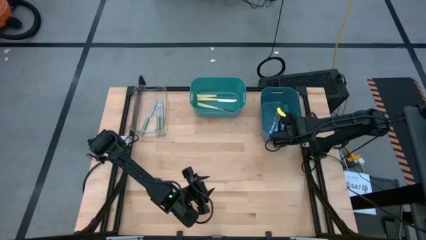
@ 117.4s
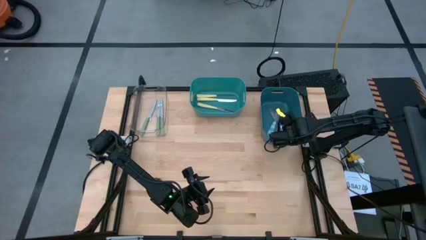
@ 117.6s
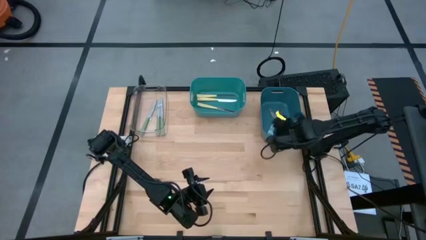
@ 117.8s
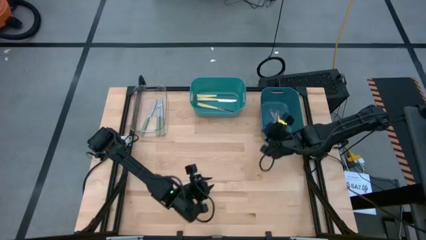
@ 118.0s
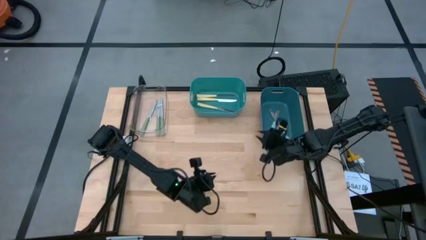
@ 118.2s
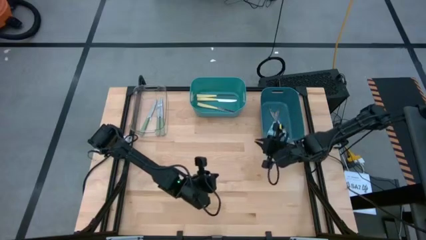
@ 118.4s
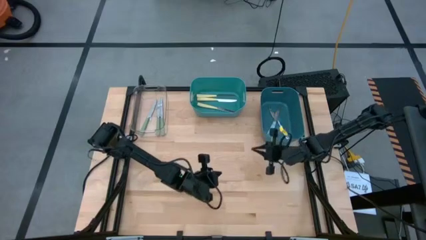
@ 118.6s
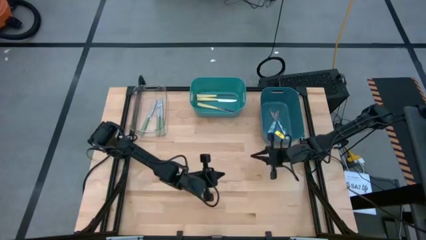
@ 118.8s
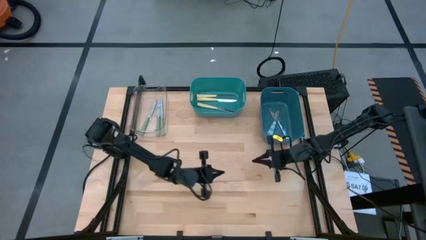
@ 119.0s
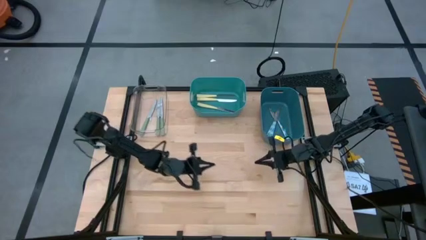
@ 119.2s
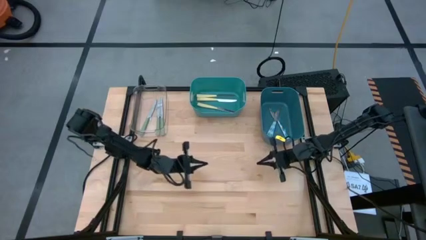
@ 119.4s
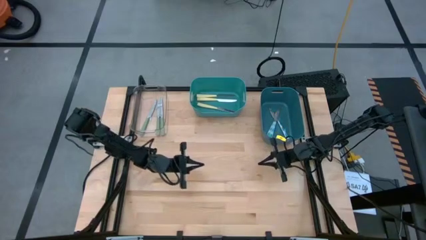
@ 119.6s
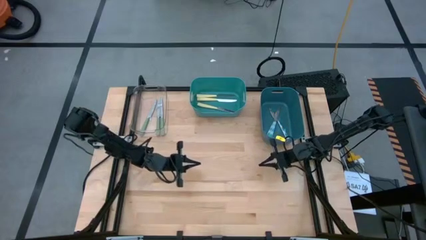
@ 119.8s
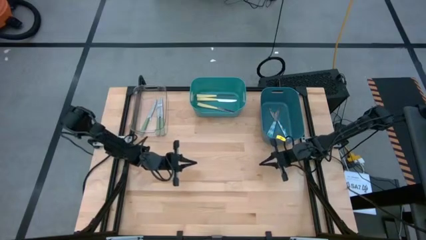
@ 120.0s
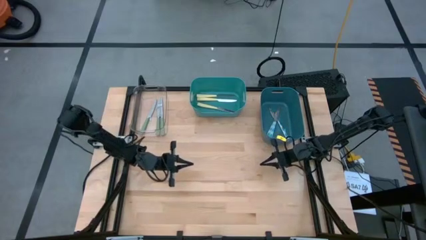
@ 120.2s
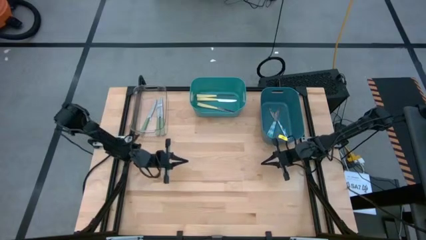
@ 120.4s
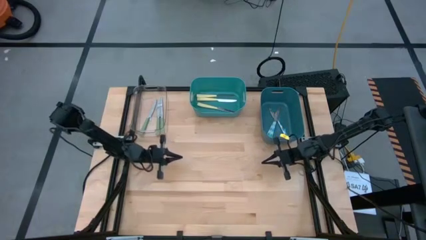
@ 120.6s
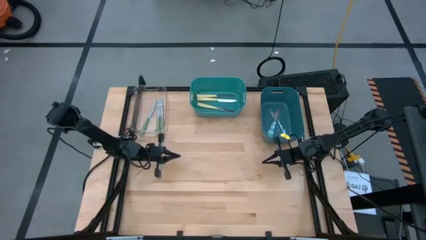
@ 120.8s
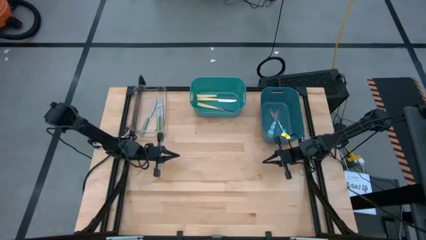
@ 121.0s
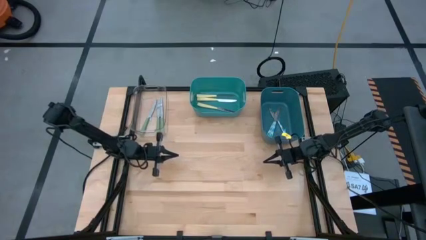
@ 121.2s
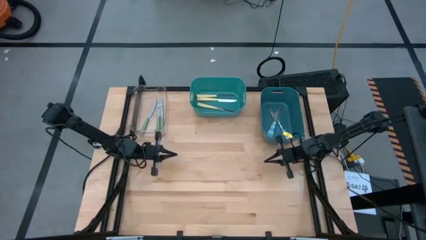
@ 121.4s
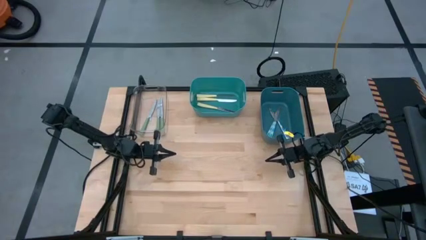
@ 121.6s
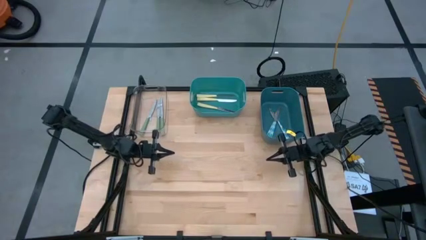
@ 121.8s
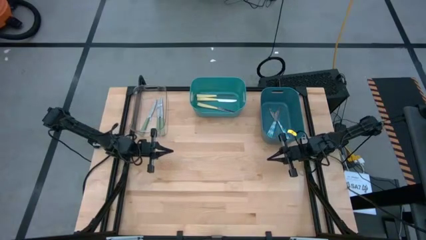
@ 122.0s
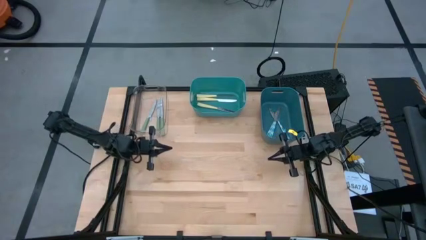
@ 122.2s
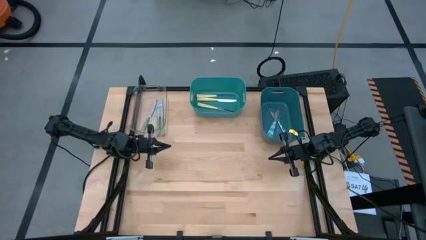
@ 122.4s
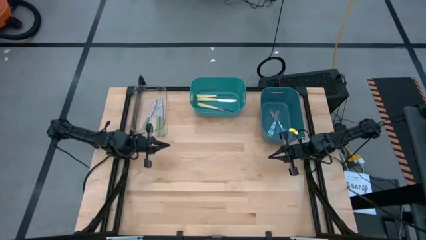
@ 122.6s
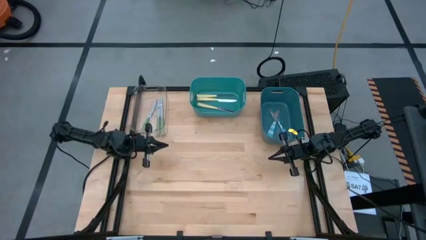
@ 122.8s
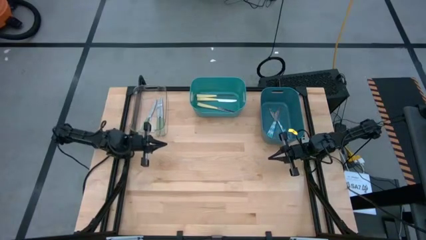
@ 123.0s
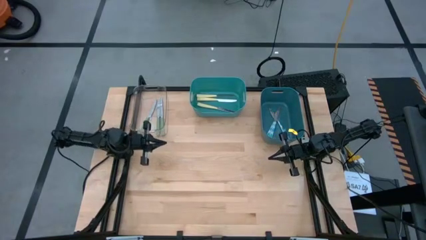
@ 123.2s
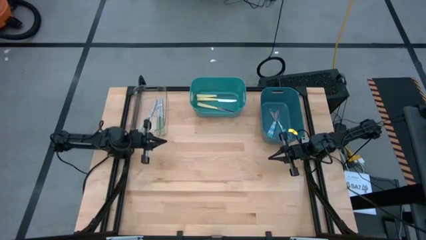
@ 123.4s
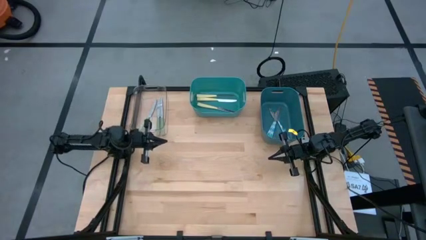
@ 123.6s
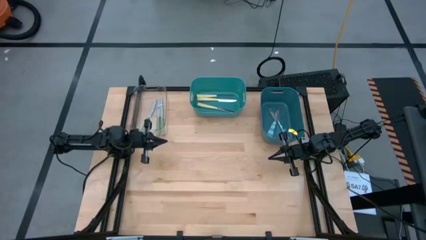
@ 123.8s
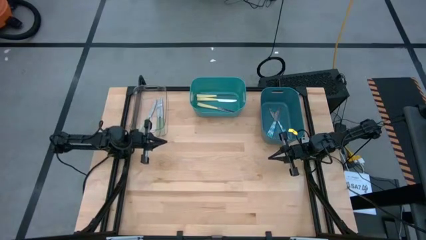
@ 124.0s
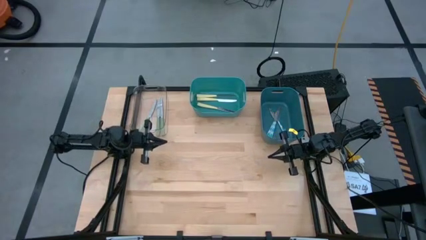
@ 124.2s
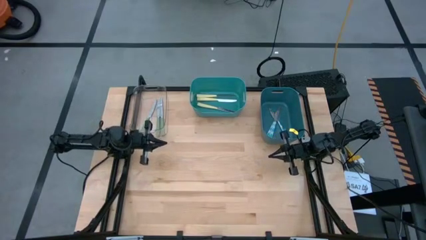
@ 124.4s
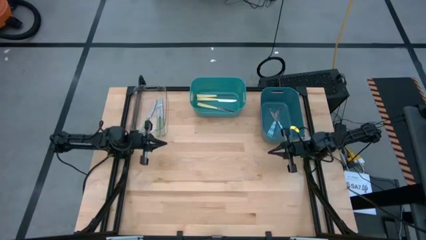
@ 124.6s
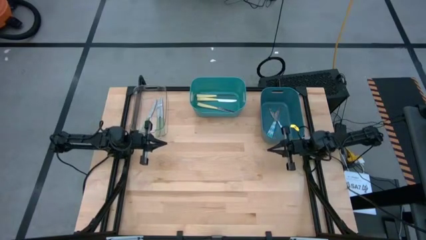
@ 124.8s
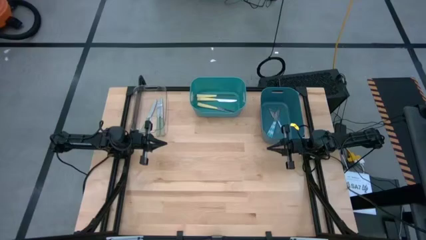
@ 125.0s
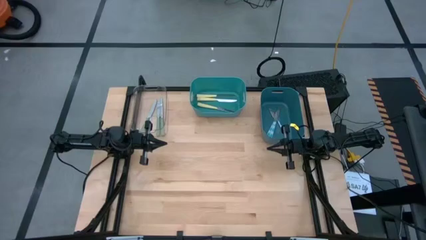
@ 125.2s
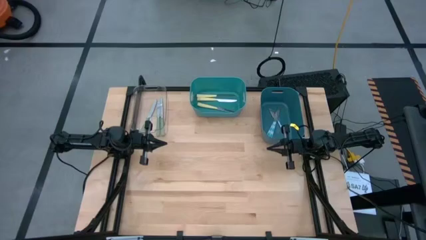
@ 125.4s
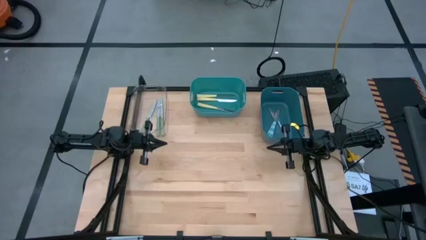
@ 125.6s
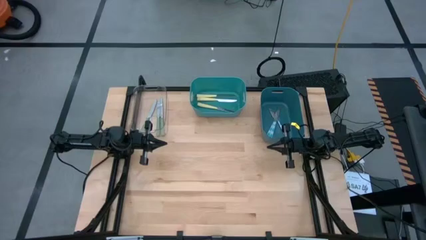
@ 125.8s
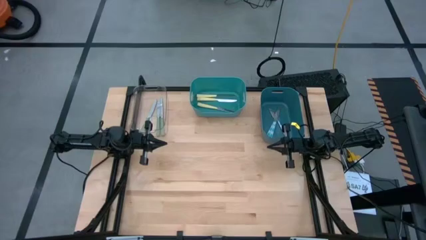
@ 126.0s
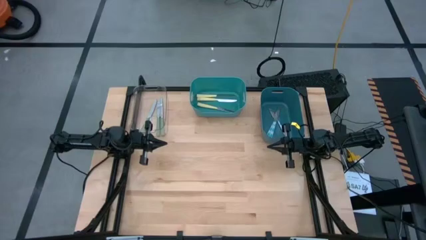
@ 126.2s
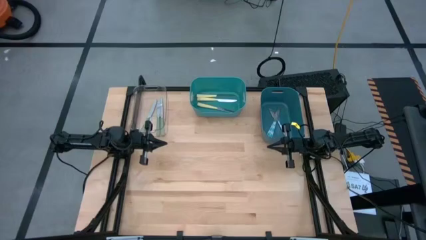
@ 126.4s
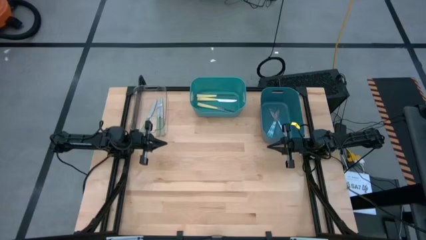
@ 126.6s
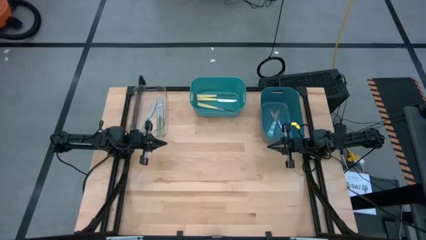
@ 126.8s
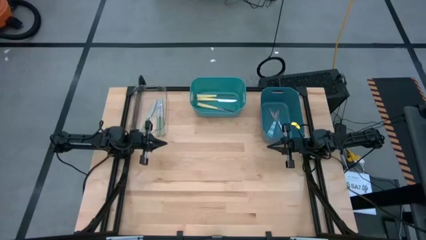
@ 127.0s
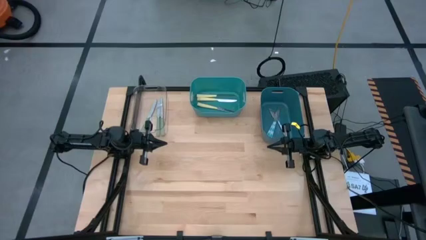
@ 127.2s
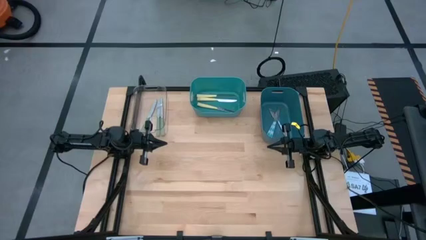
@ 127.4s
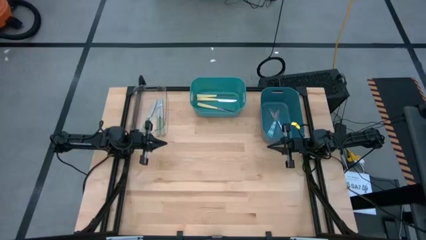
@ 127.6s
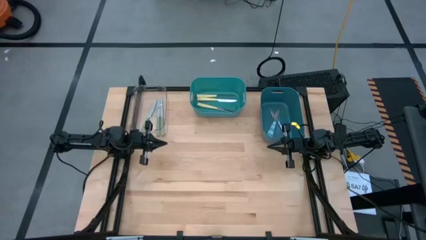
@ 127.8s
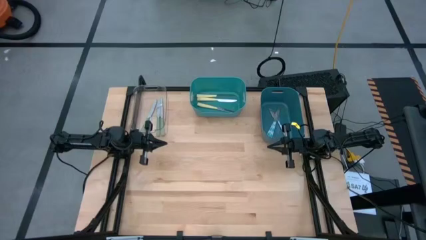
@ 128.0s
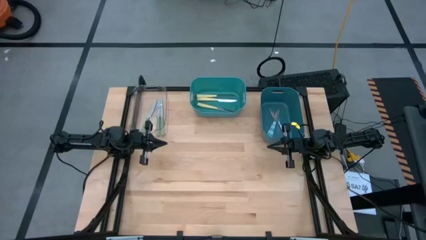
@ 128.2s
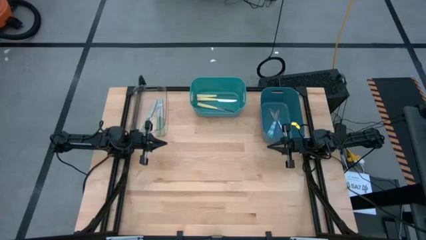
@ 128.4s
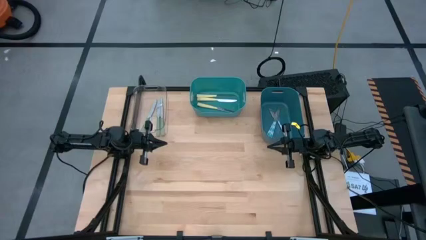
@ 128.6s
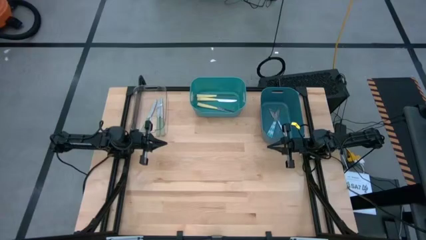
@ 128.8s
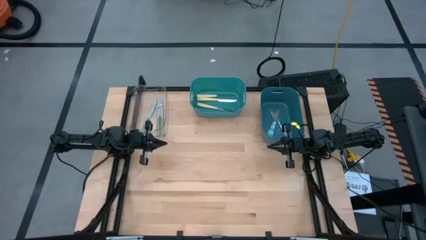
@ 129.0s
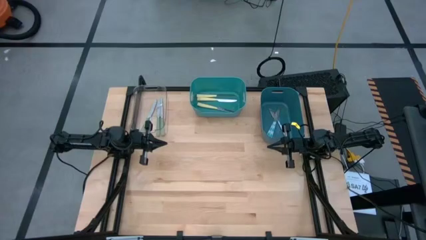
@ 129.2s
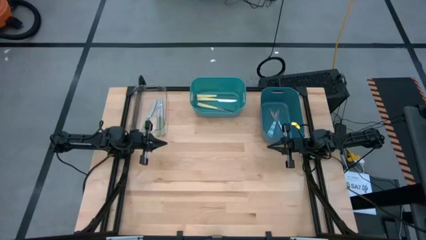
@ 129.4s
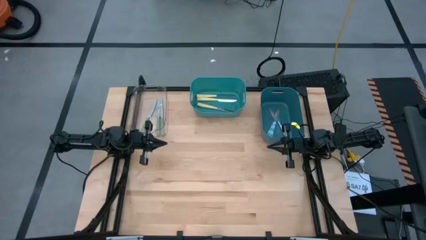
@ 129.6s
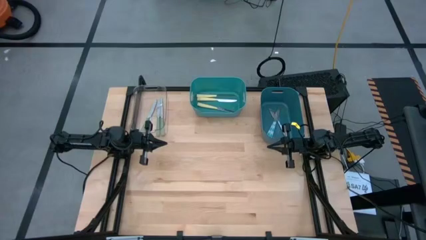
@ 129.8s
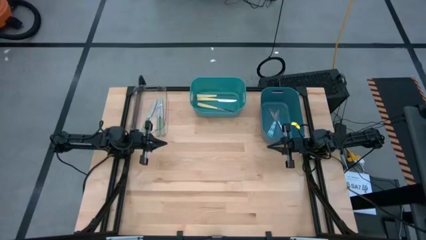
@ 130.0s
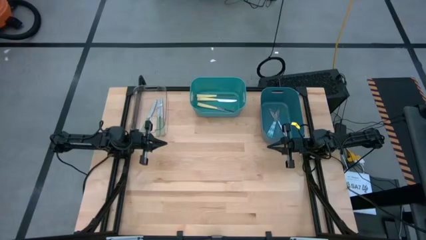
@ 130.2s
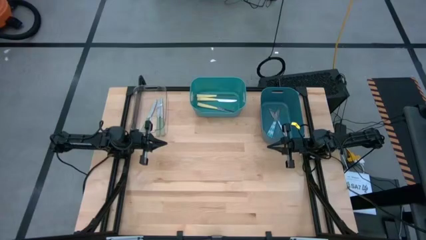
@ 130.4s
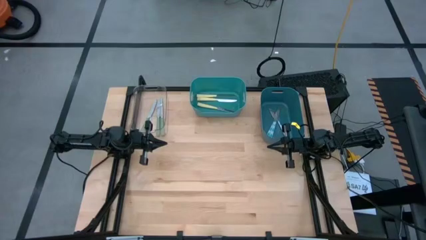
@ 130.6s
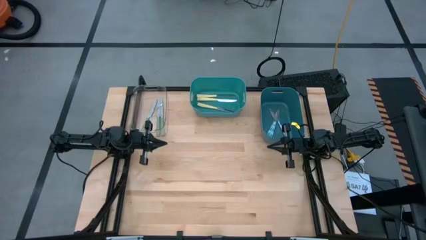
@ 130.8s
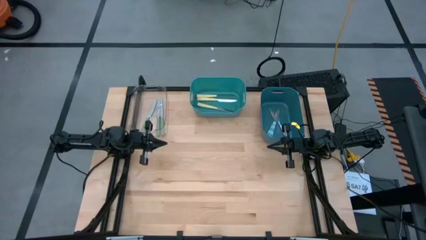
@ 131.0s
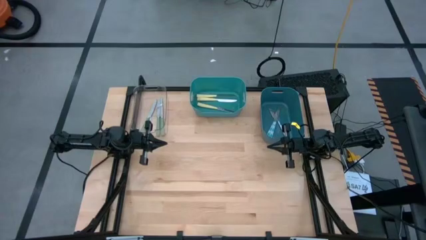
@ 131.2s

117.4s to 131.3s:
Task: Sort silverware by color (type)
Return to Home Position
